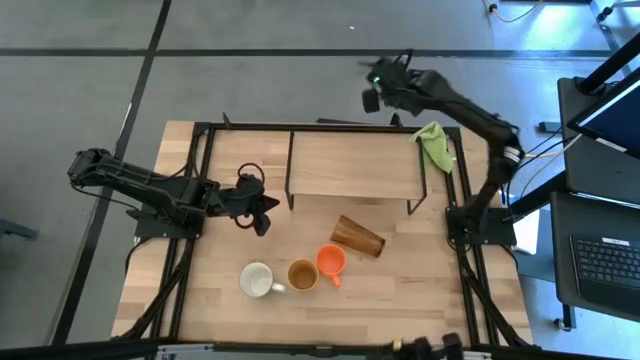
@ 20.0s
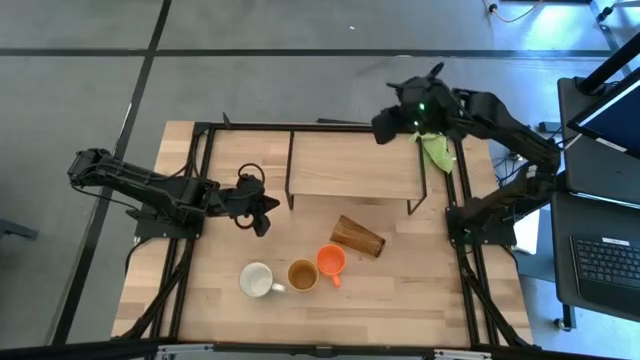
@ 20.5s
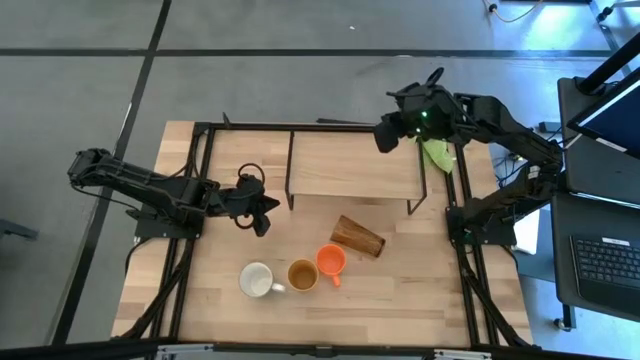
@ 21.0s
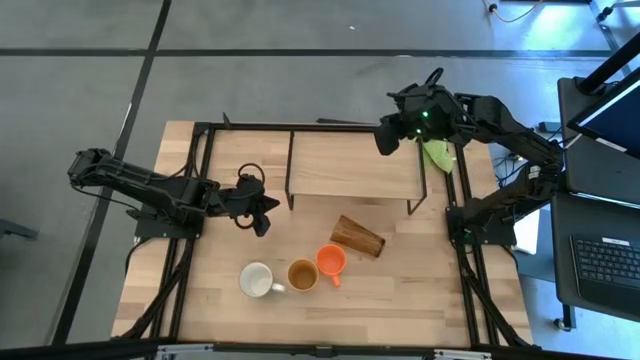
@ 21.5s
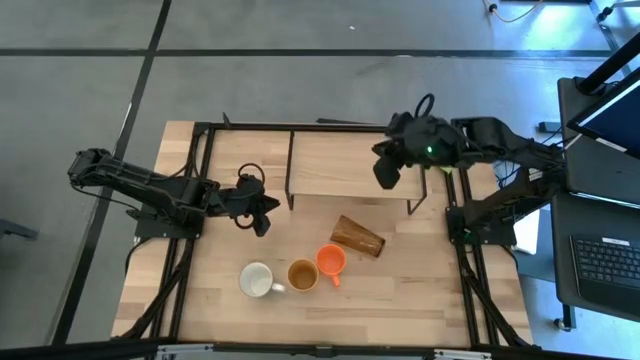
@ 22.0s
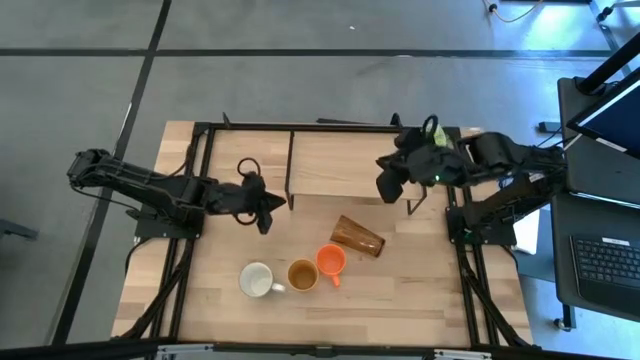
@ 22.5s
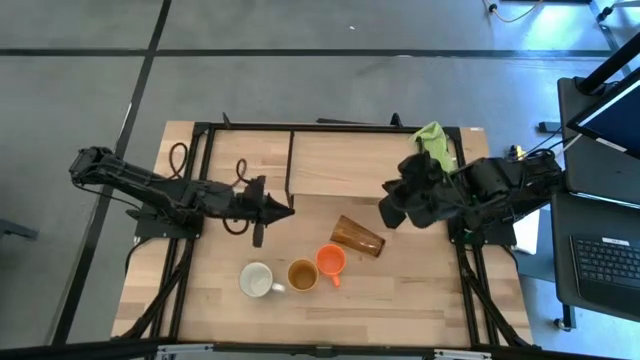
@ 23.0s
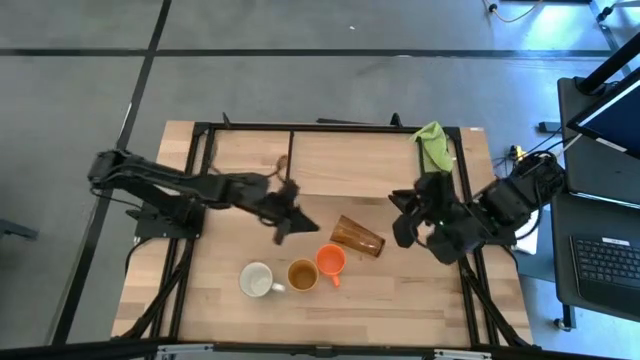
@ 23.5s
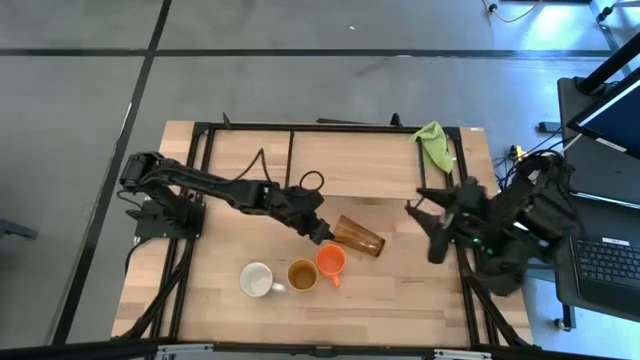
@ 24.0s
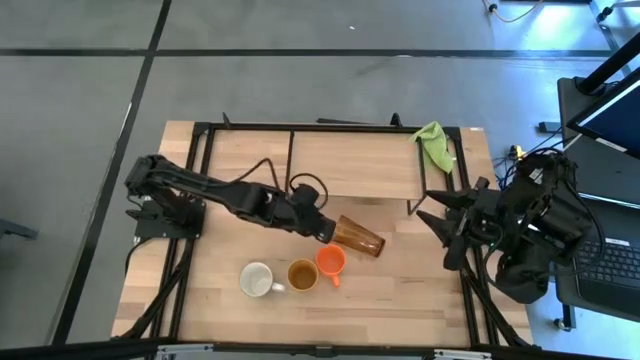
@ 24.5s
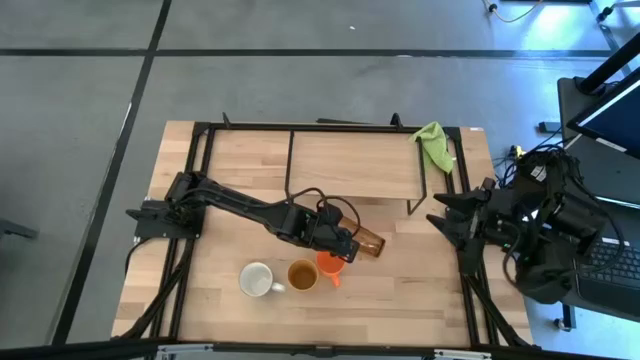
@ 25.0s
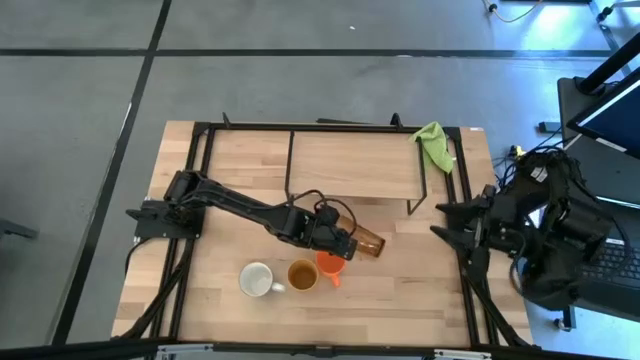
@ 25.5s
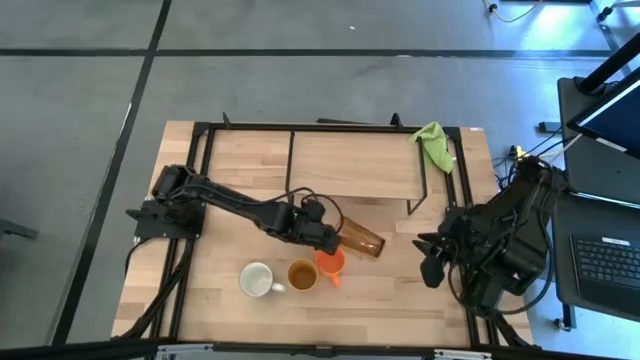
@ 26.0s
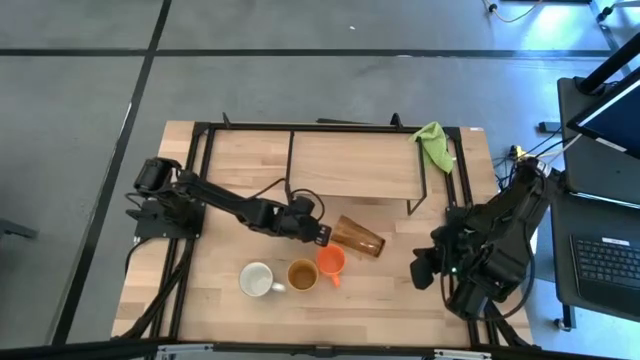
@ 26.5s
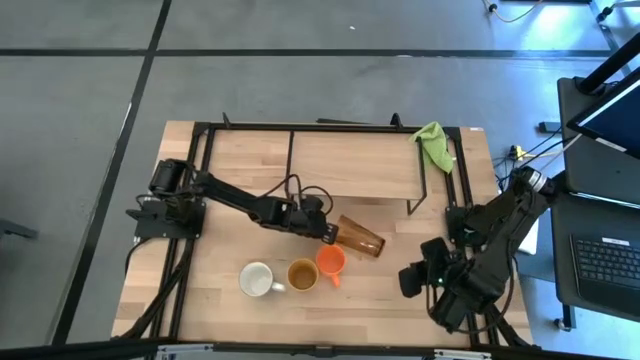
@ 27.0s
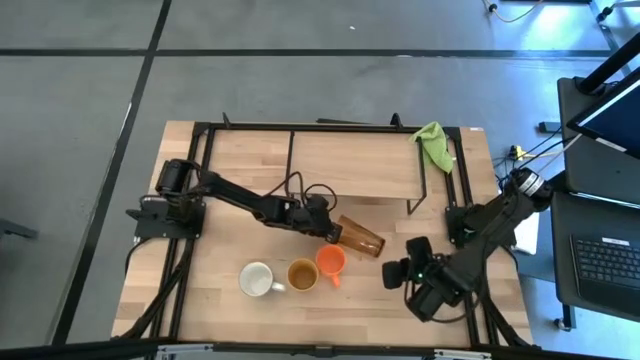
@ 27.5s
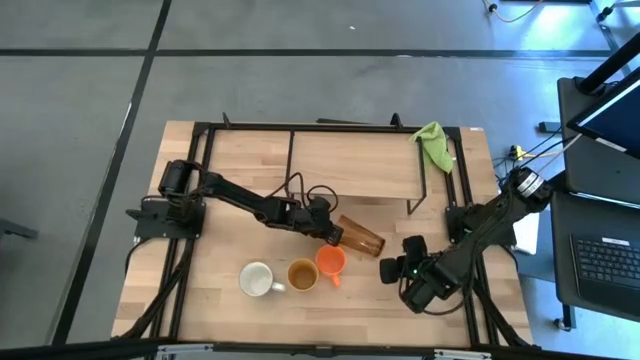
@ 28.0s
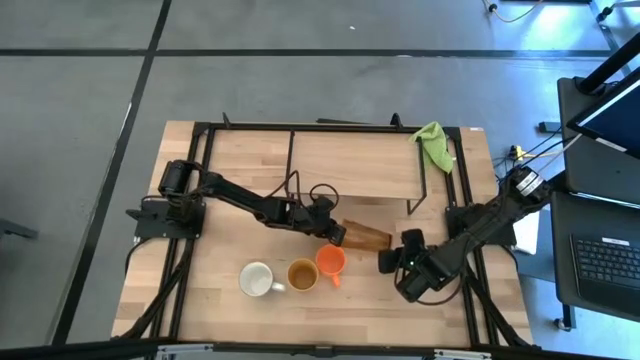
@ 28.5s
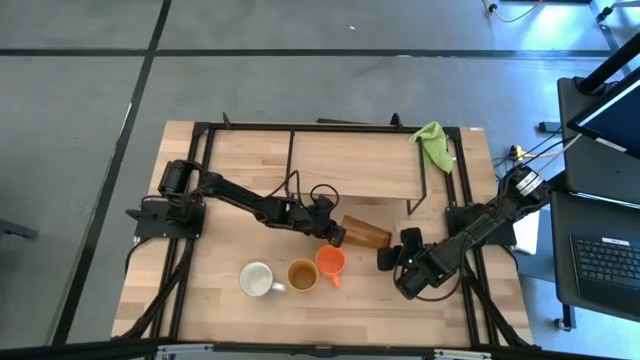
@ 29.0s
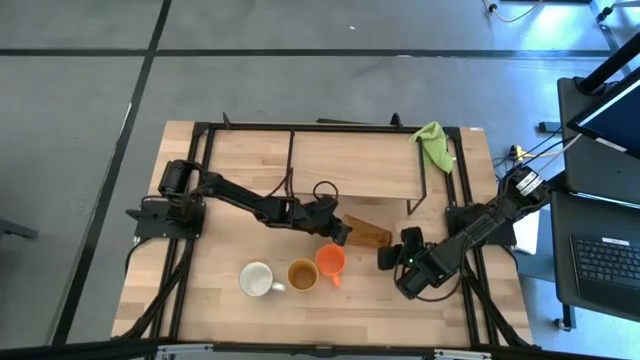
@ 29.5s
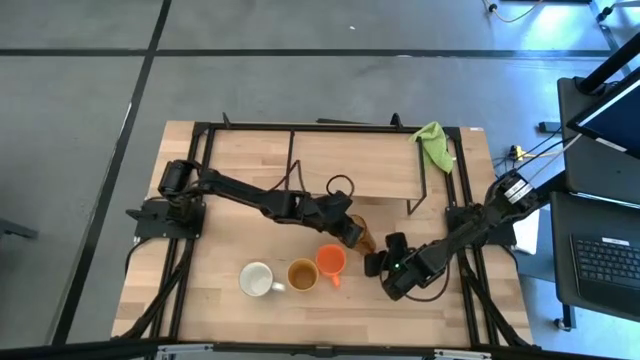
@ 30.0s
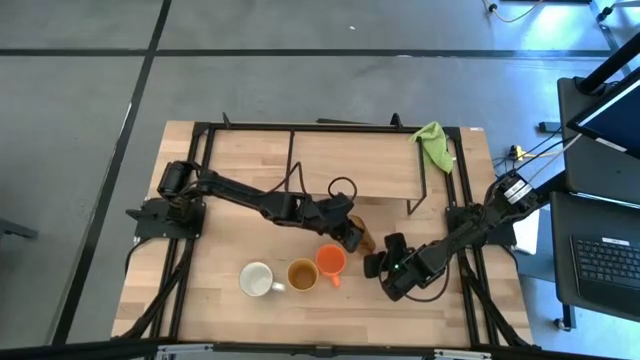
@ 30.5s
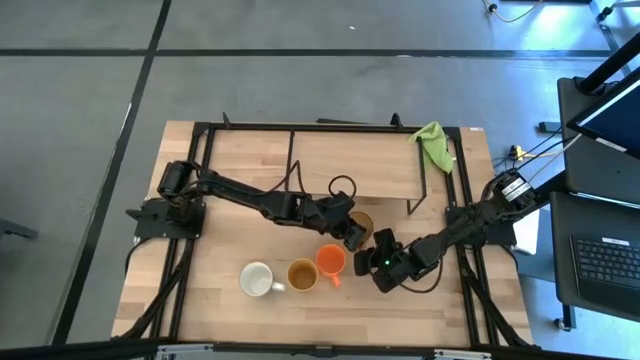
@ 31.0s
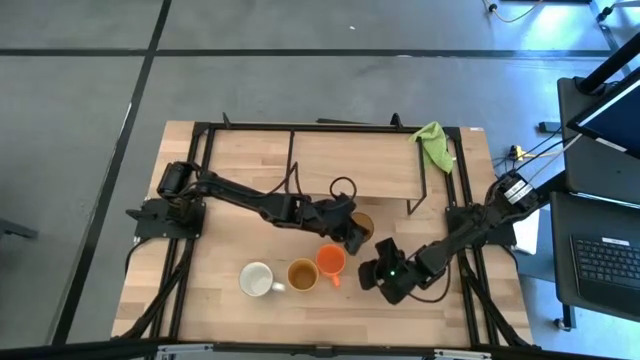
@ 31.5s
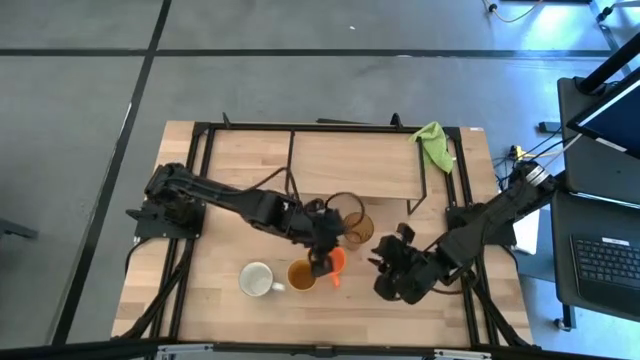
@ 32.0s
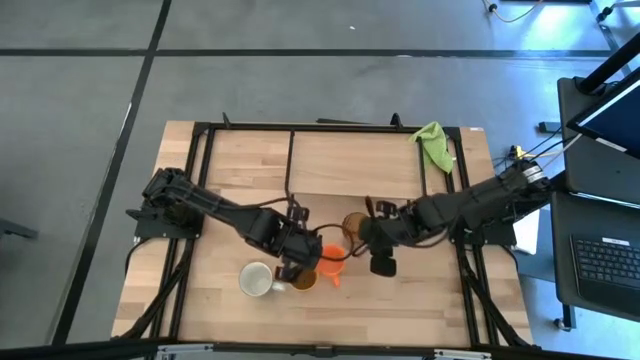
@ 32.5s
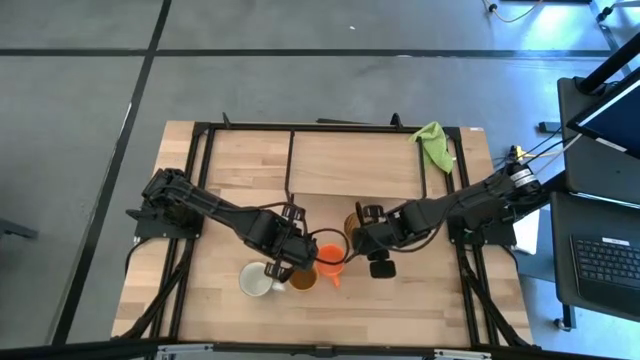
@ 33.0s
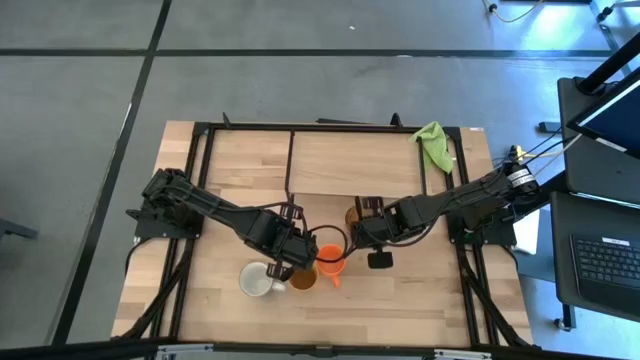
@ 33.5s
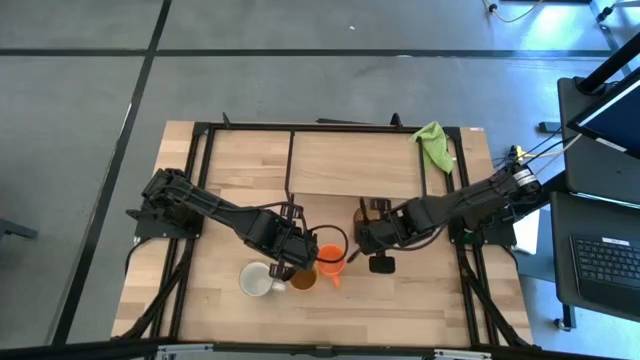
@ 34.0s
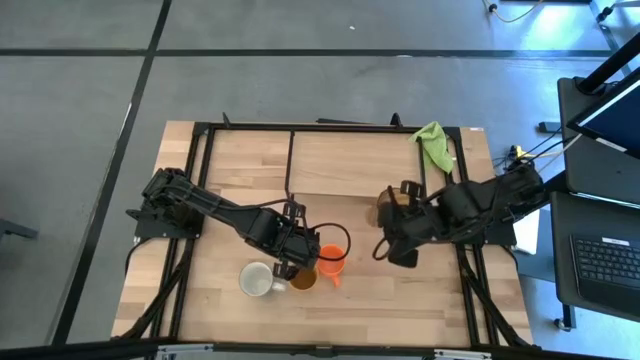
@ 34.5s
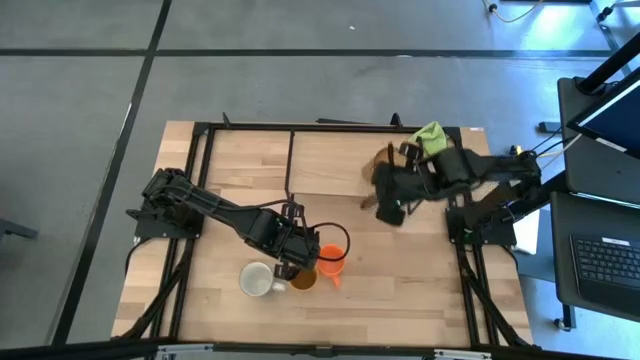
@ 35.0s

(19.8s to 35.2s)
Task: Stack small to large cups/mugs on shelf
Put the brown cup on the shelf

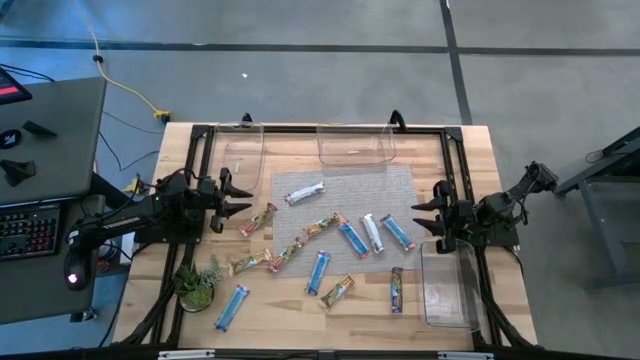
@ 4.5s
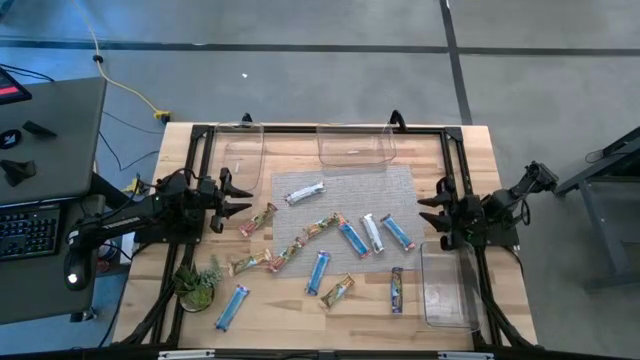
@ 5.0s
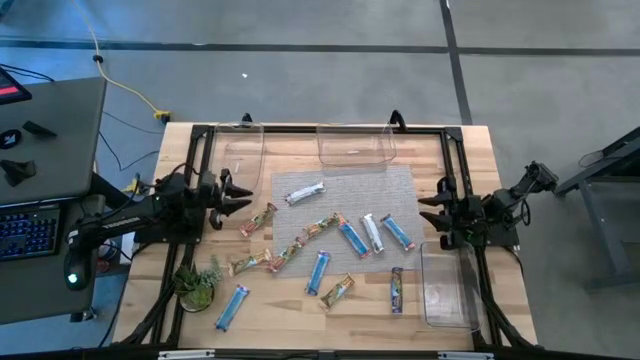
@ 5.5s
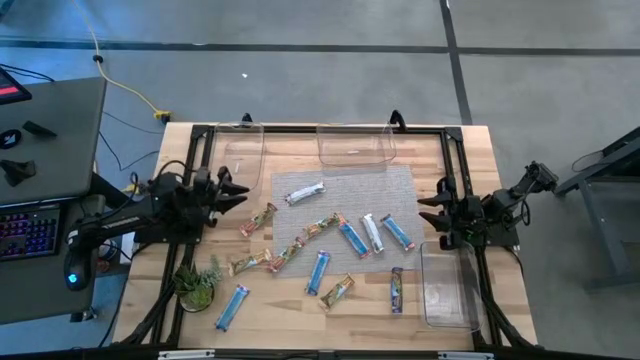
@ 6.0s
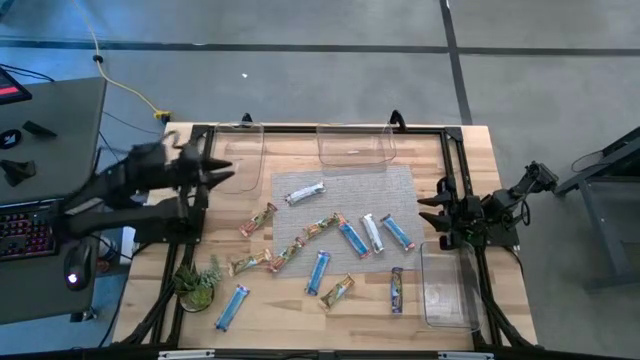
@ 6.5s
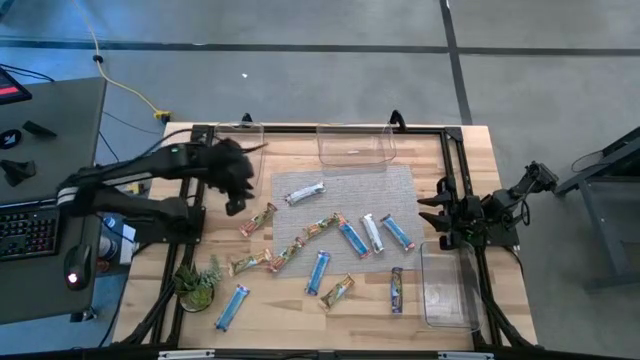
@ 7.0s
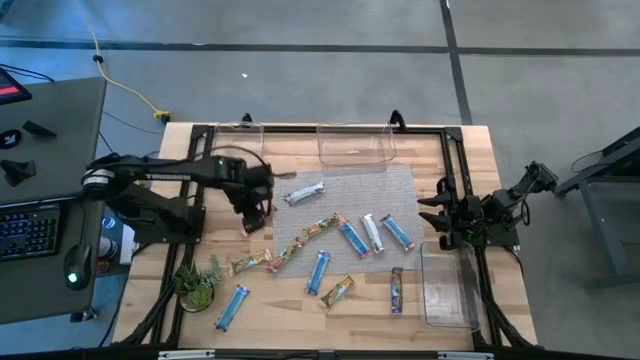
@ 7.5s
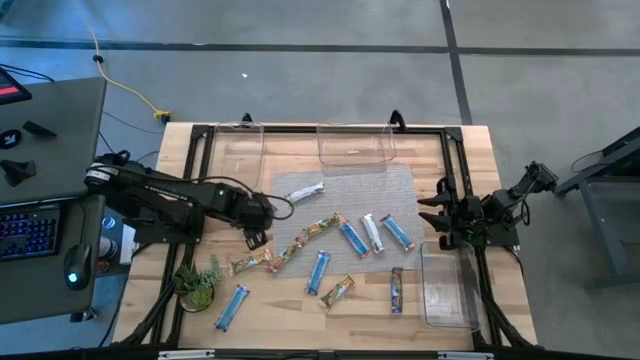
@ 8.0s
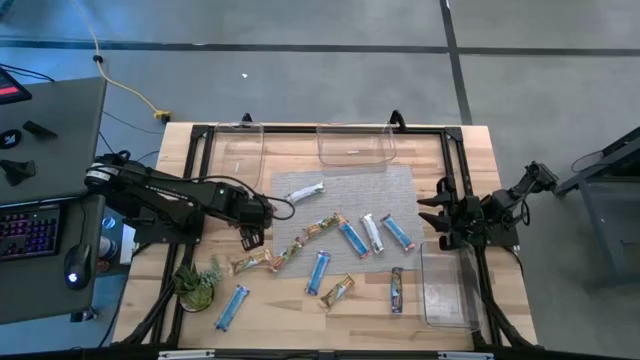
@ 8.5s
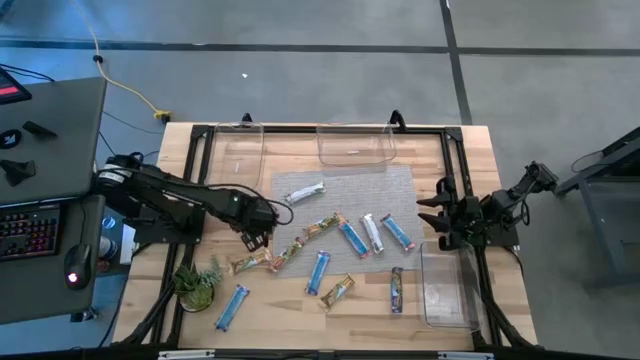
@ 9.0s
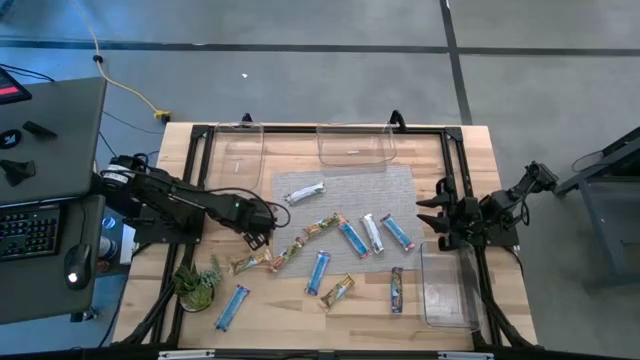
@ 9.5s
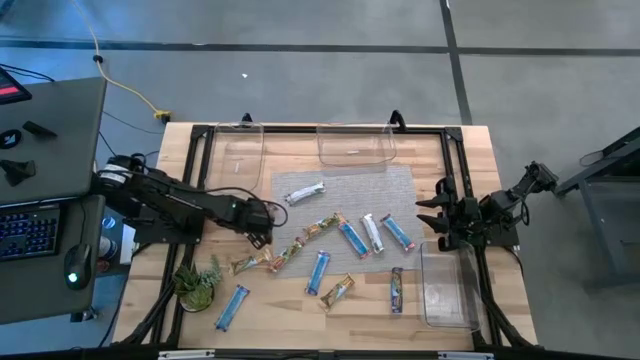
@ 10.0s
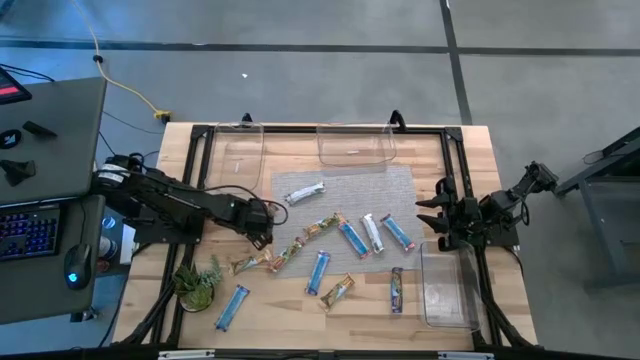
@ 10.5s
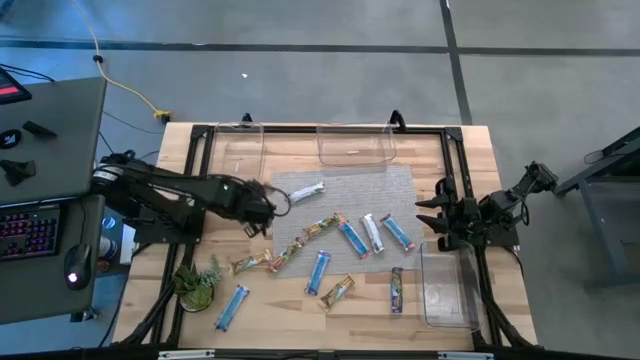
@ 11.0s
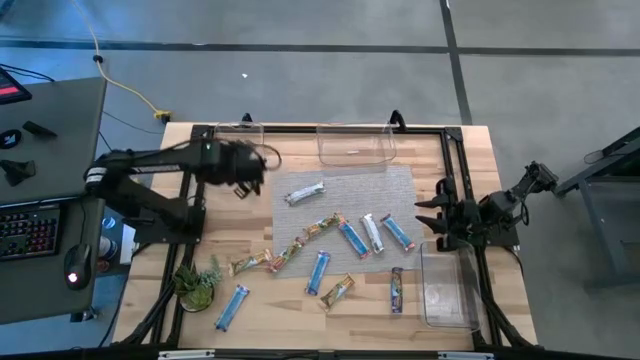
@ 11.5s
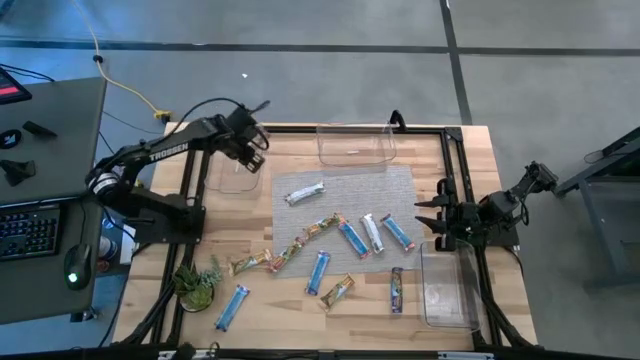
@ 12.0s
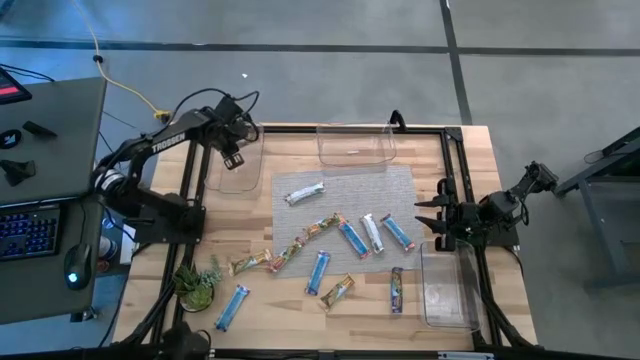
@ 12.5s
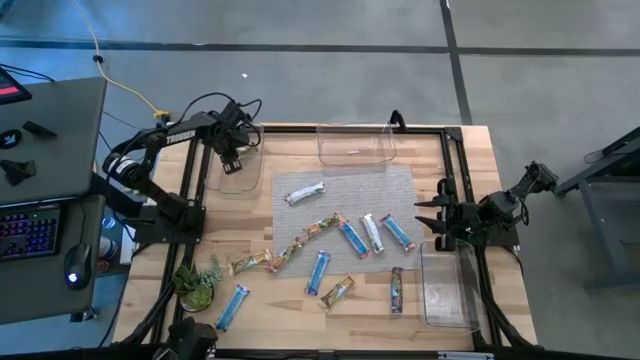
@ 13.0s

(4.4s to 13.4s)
Task: Pick and place Granola Bars by type
Put the red granola bar into the top left transparent bin
